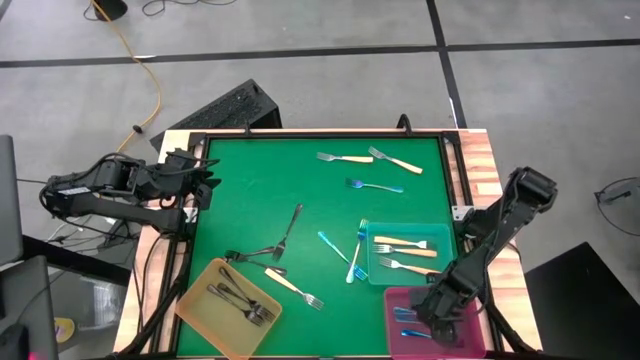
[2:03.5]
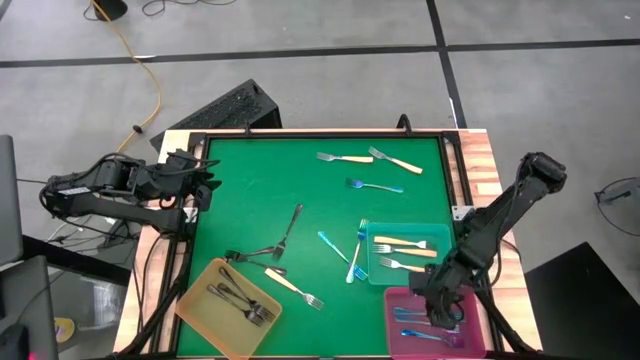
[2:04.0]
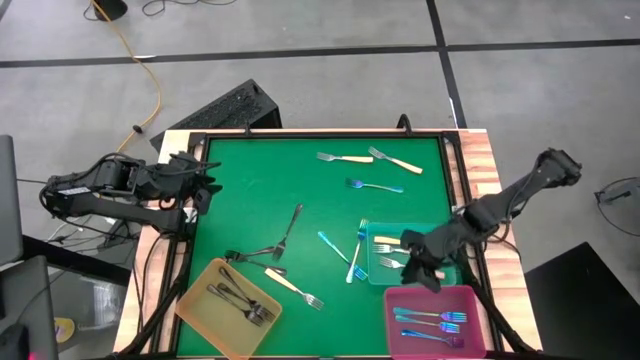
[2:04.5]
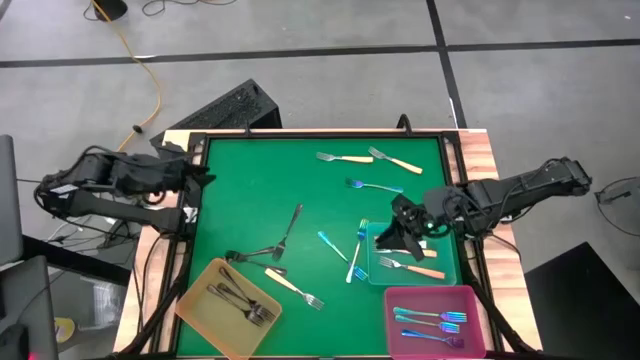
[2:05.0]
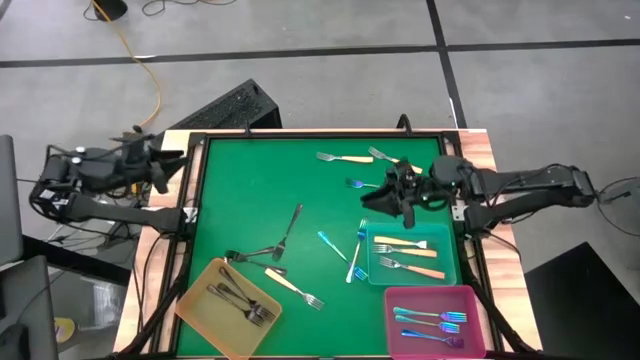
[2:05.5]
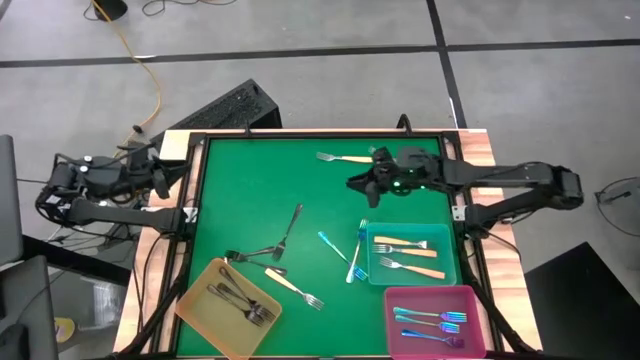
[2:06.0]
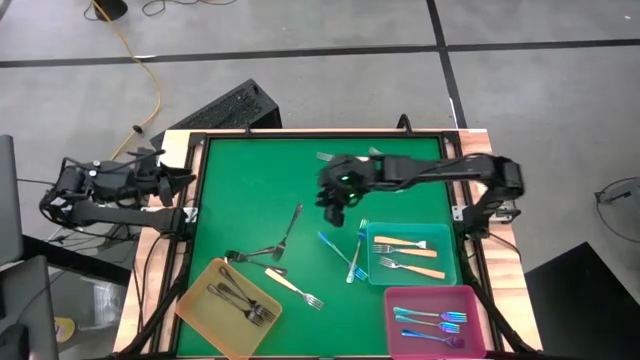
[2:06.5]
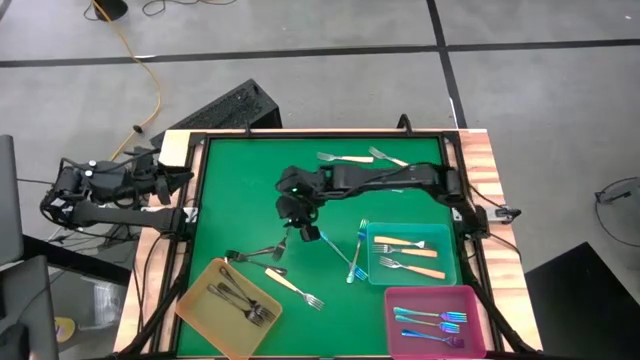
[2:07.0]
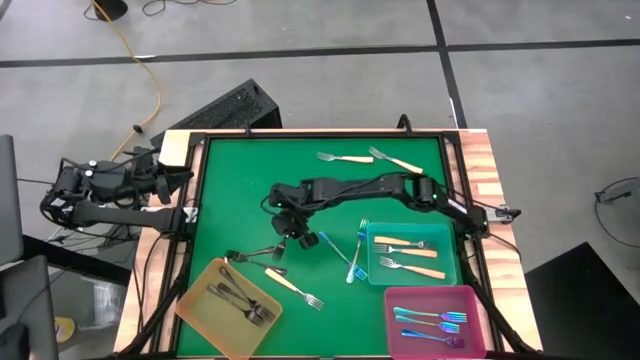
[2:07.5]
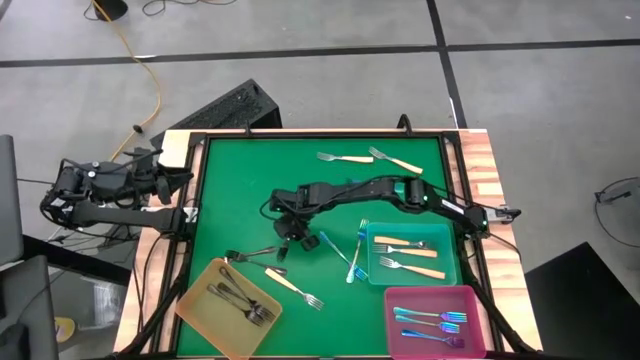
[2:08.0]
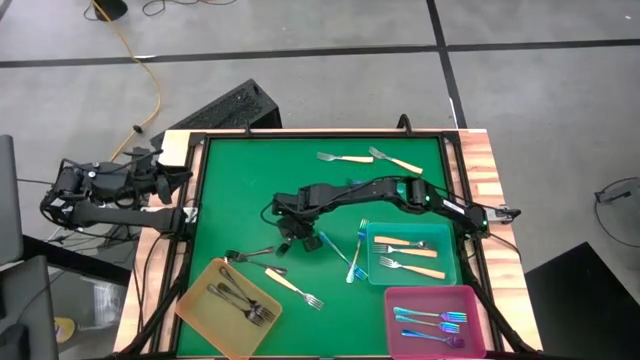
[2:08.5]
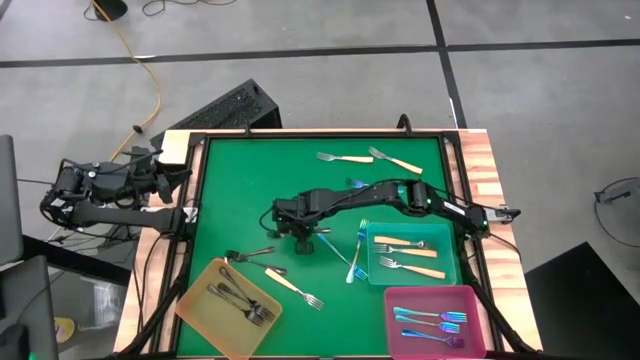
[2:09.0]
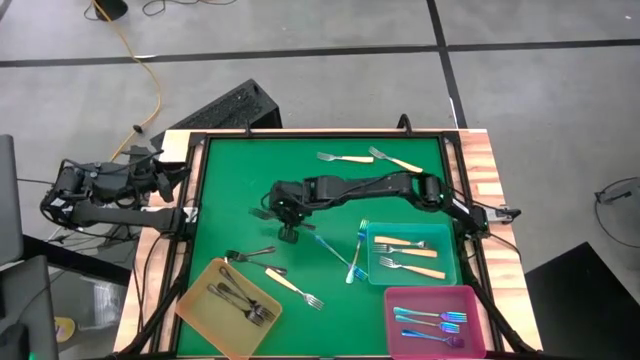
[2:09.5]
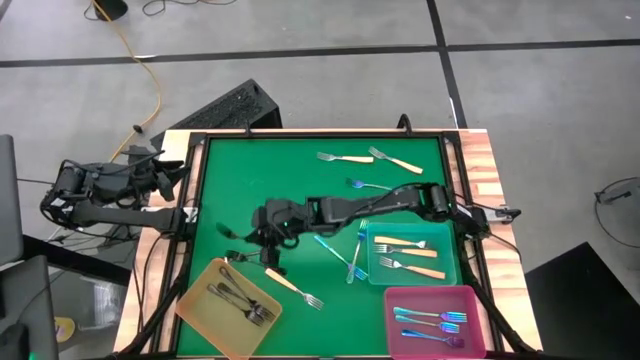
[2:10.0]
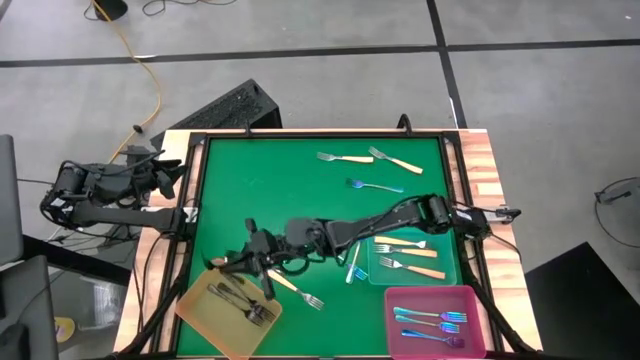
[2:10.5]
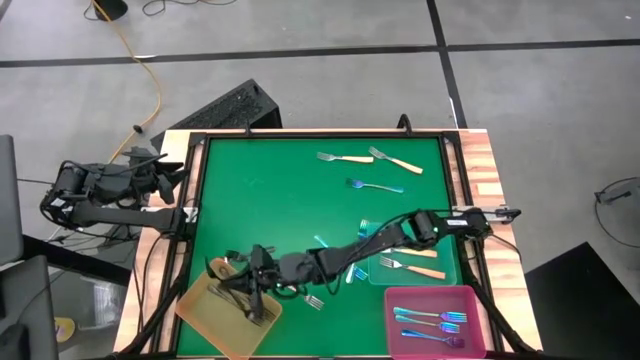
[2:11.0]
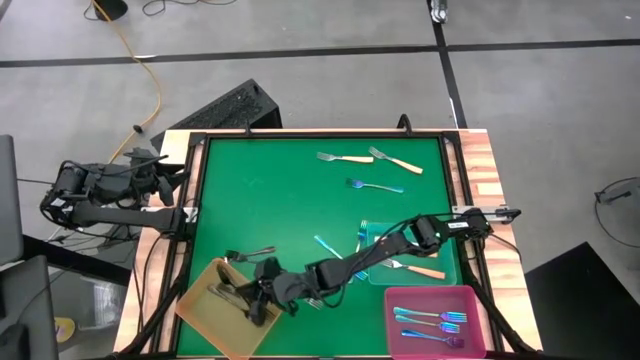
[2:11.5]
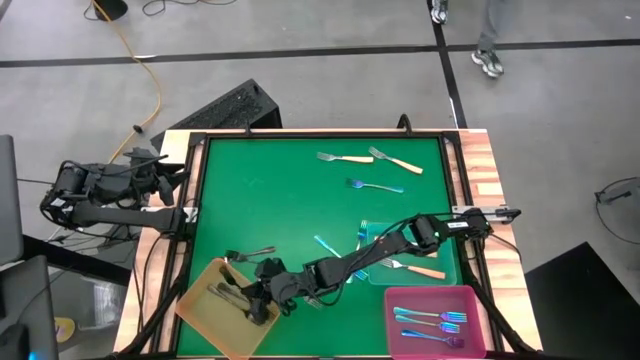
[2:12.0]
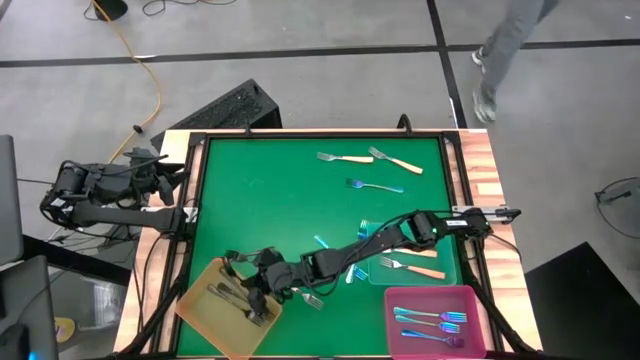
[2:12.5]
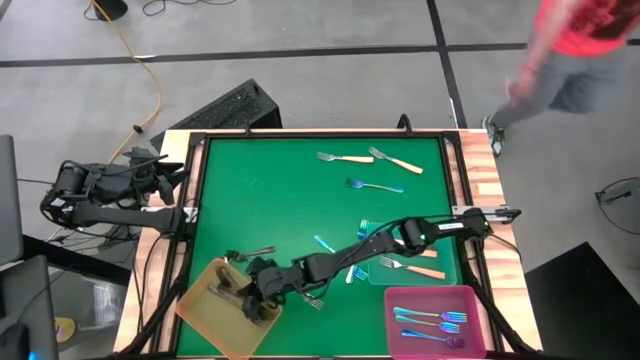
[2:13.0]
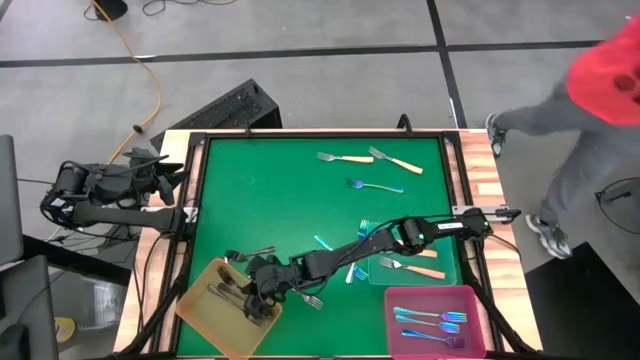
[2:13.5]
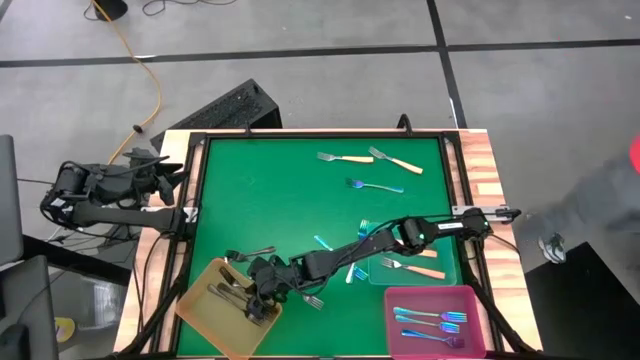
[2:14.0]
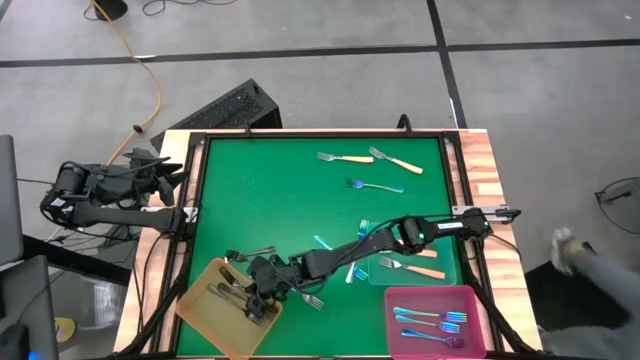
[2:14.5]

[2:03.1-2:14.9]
Task: Sort silverware by color (type)
Put the black fork into the orange bin

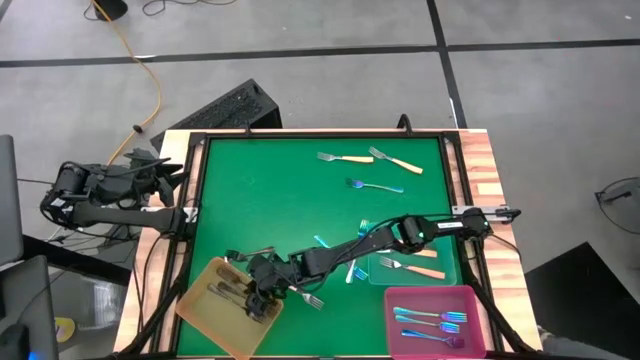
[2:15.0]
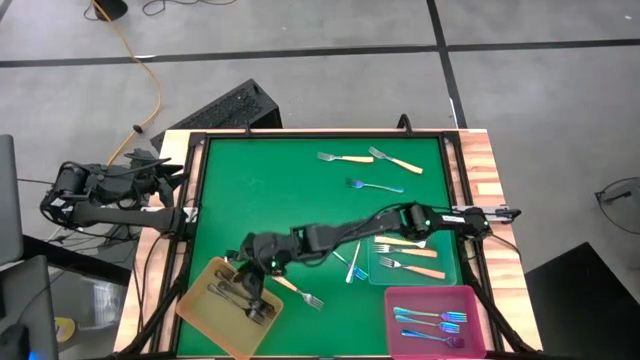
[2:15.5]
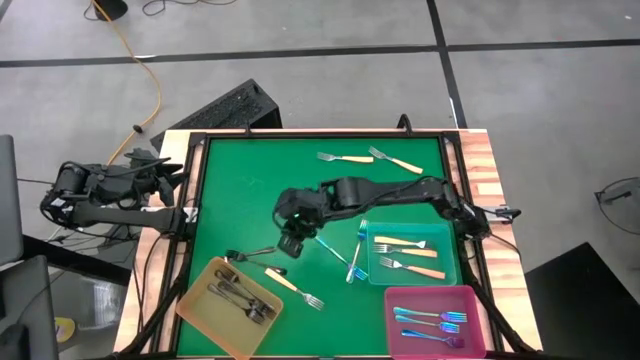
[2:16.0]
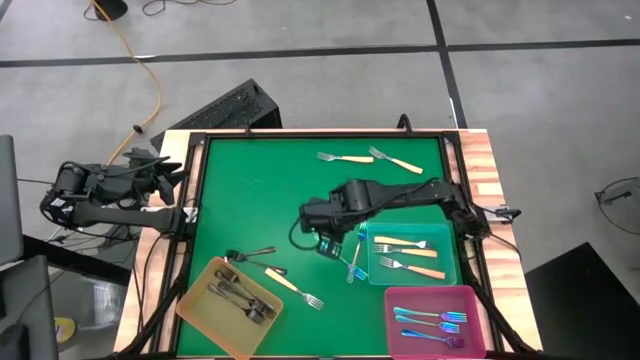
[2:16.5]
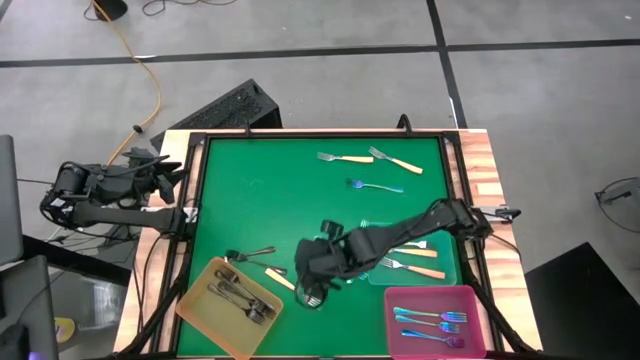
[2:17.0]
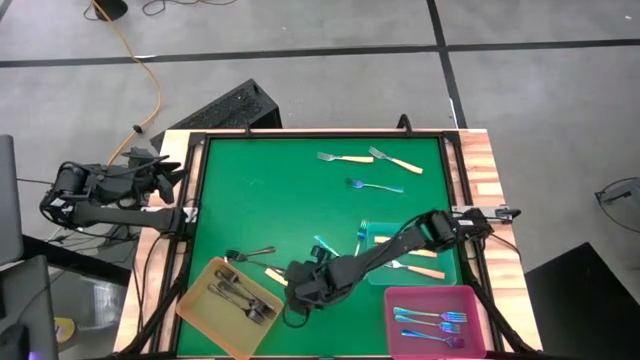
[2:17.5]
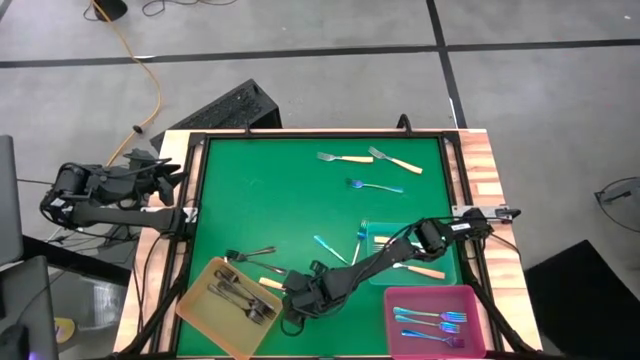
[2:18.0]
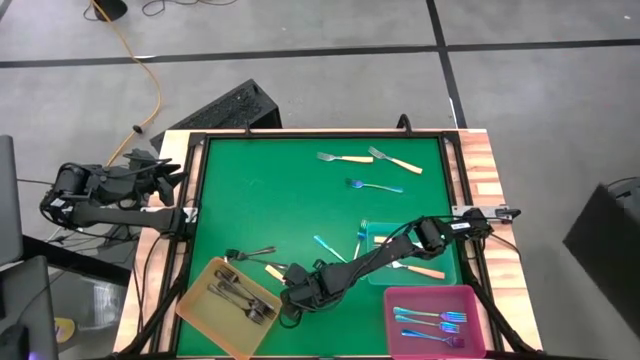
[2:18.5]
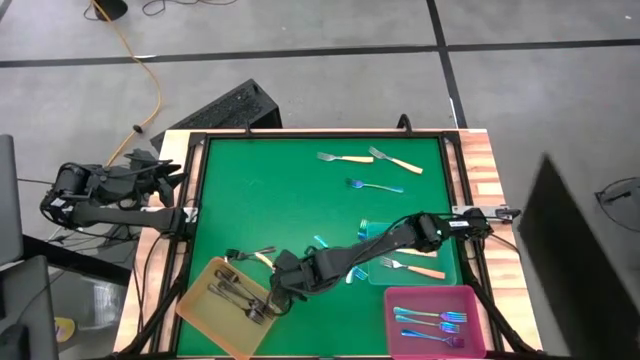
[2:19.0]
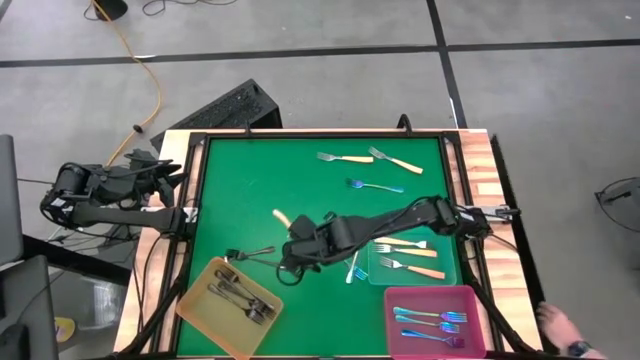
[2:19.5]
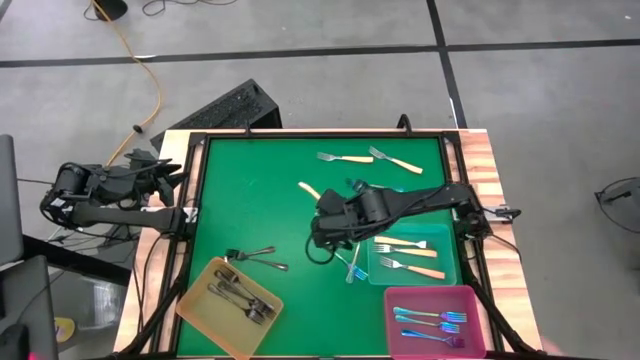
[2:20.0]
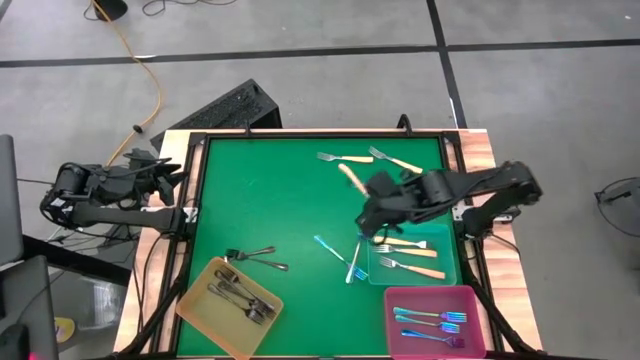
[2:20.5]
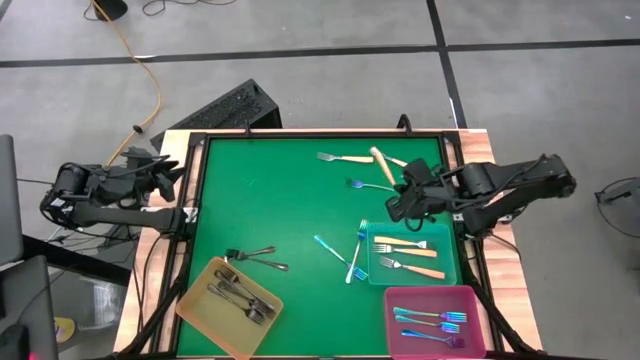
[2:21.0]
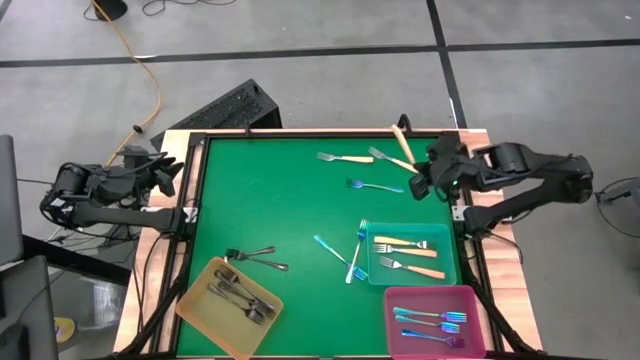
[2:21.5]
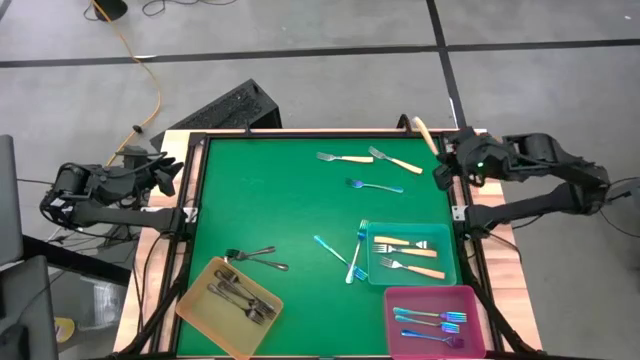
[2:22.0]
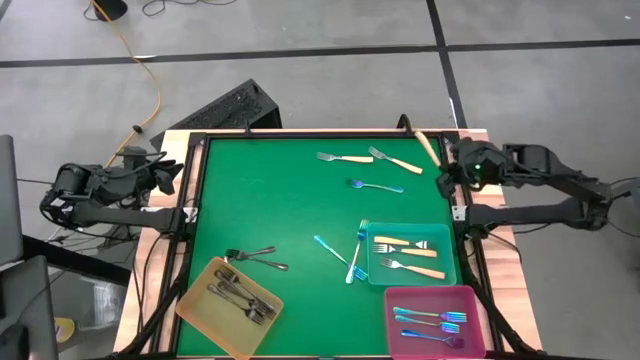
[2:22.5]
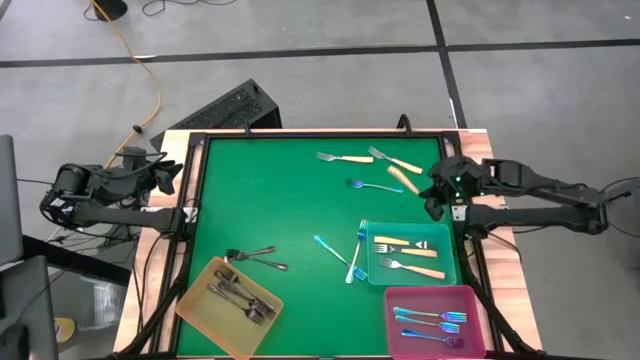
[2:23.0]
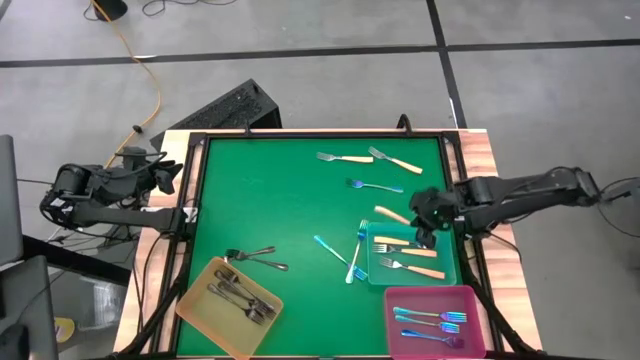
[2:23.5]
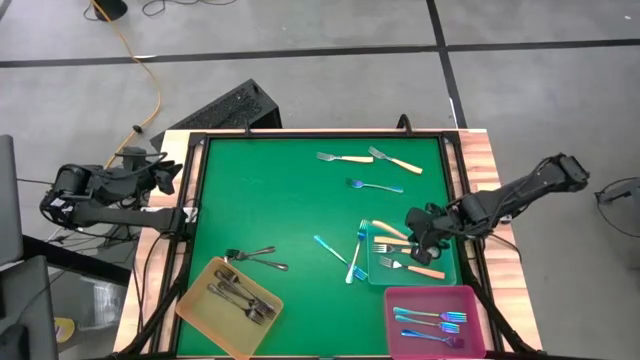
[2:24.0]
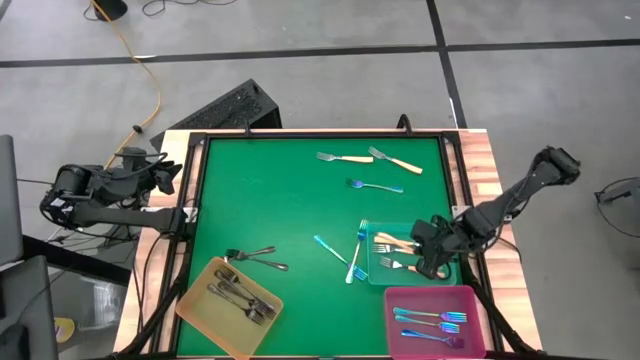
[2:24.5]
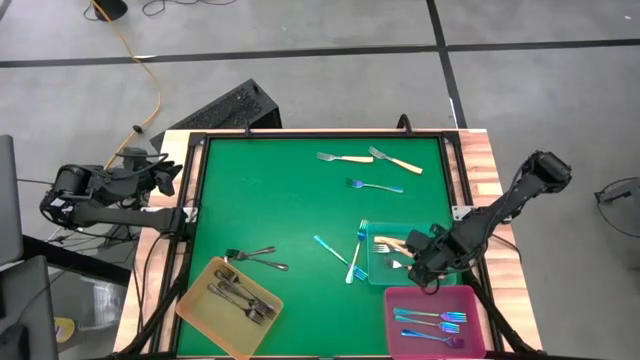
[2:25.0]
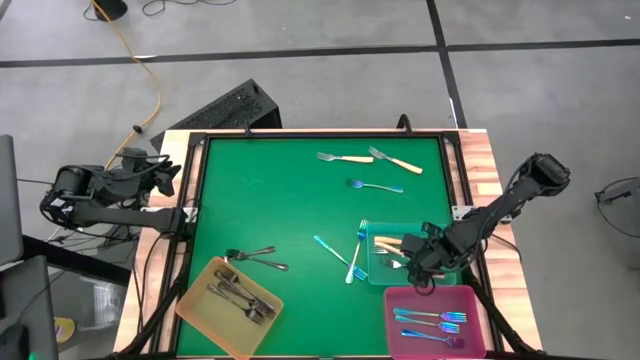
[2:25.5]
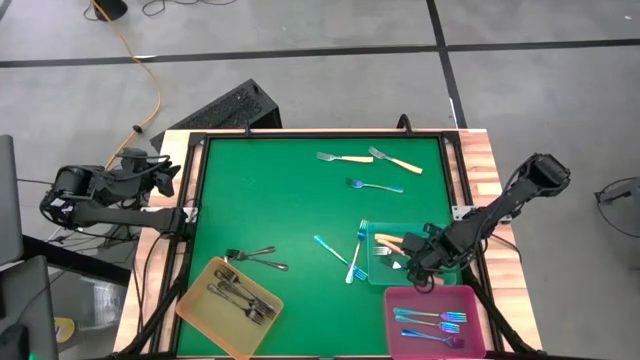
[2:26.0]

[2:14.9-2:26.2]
Put the yellow fork into the green bin
